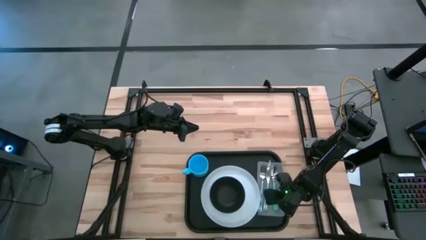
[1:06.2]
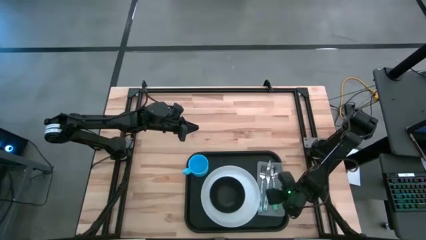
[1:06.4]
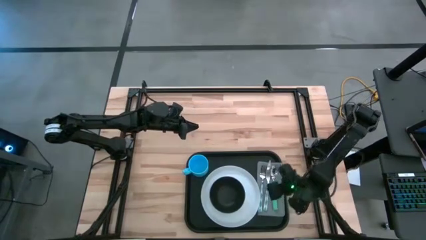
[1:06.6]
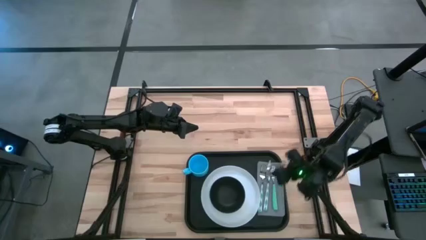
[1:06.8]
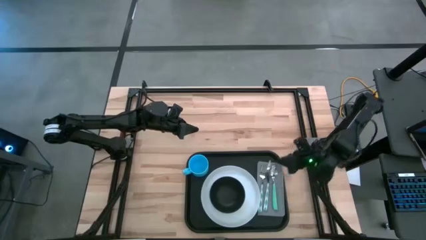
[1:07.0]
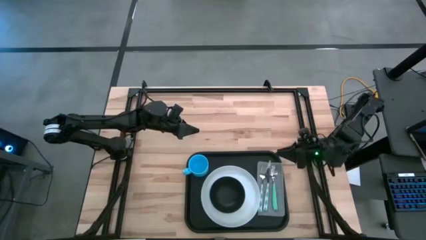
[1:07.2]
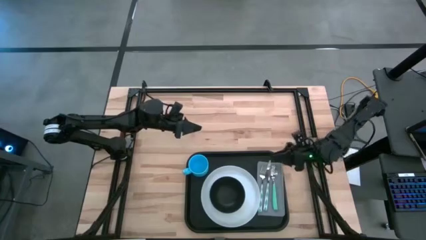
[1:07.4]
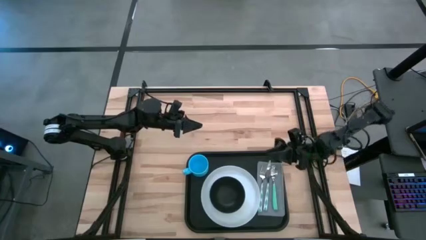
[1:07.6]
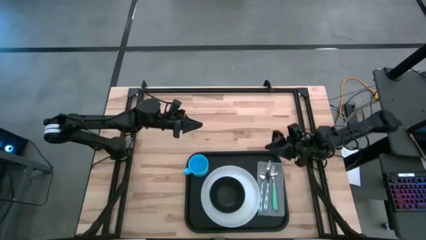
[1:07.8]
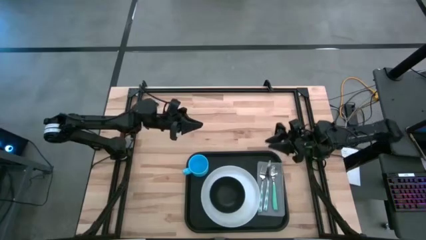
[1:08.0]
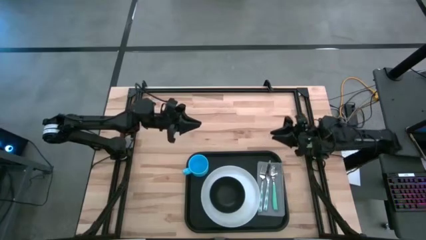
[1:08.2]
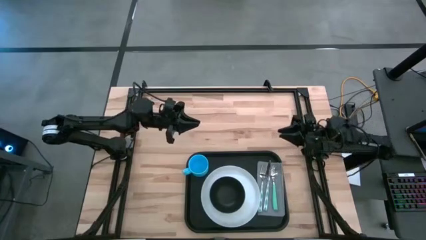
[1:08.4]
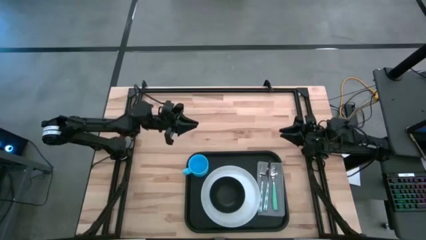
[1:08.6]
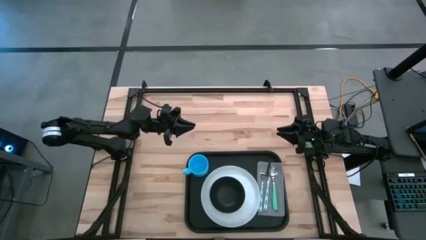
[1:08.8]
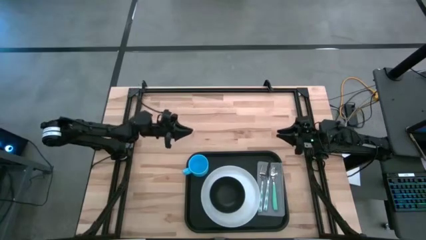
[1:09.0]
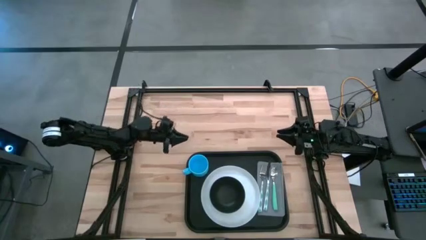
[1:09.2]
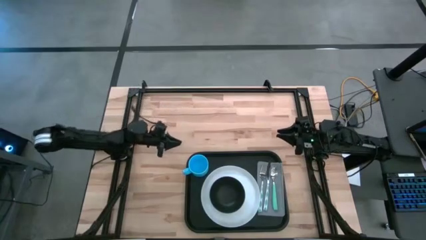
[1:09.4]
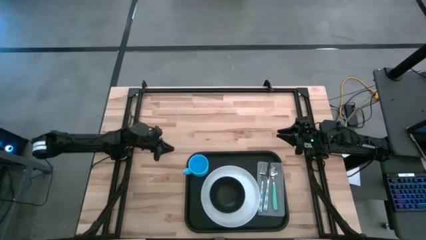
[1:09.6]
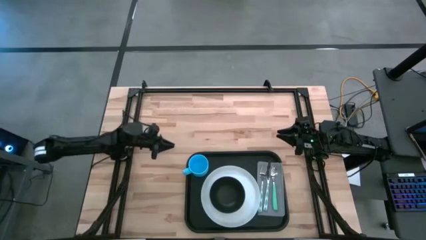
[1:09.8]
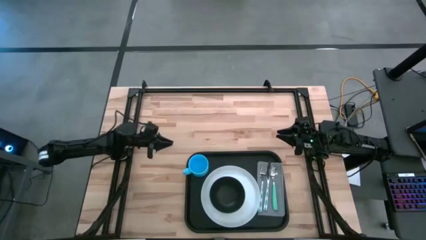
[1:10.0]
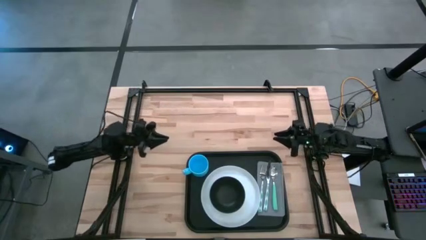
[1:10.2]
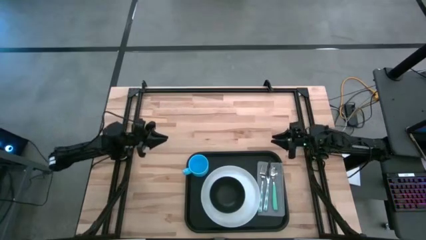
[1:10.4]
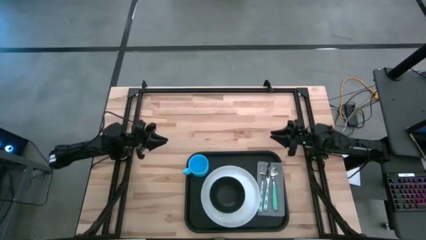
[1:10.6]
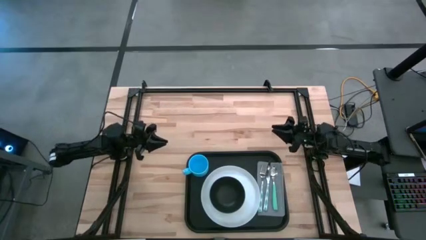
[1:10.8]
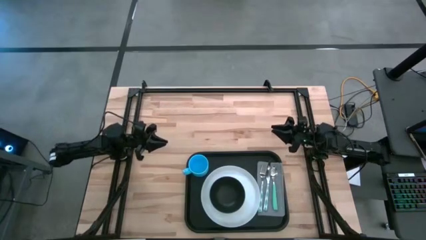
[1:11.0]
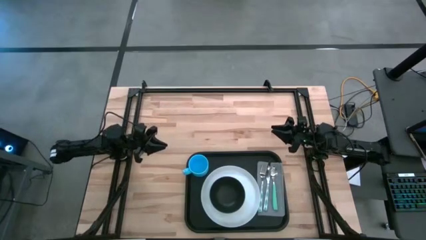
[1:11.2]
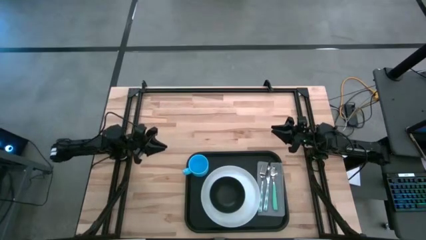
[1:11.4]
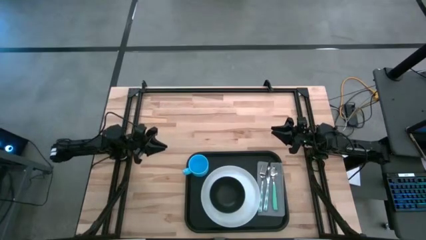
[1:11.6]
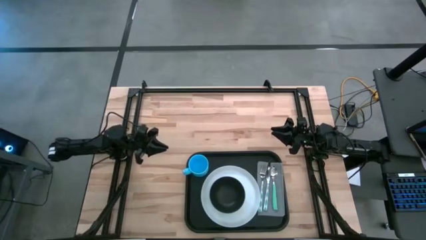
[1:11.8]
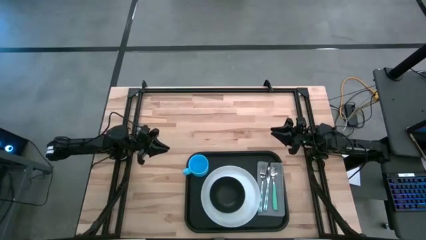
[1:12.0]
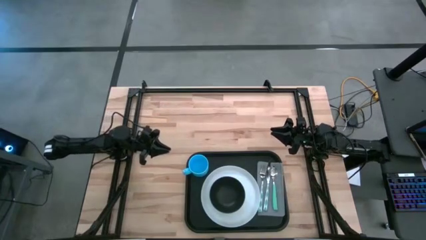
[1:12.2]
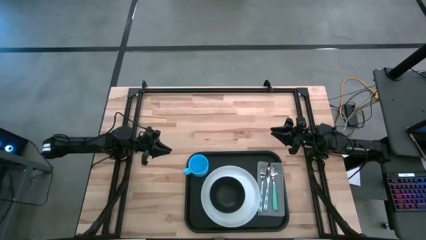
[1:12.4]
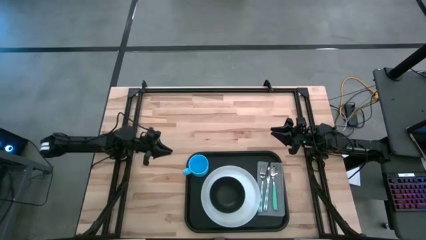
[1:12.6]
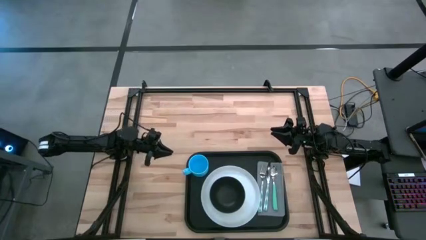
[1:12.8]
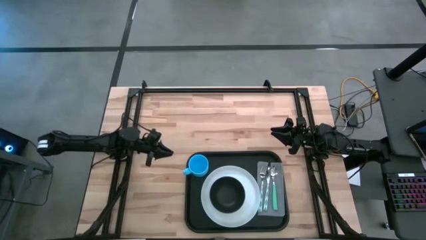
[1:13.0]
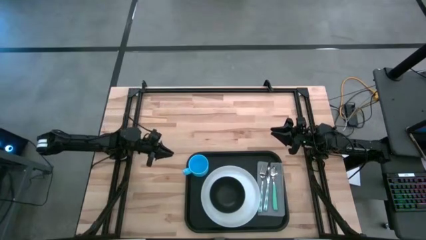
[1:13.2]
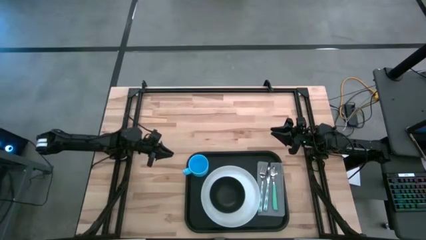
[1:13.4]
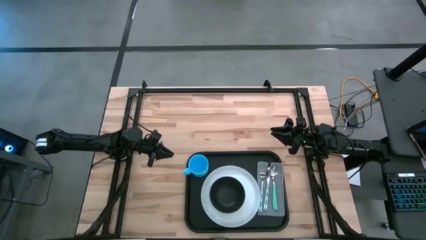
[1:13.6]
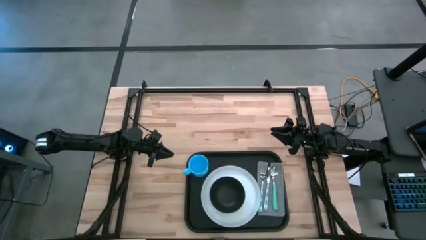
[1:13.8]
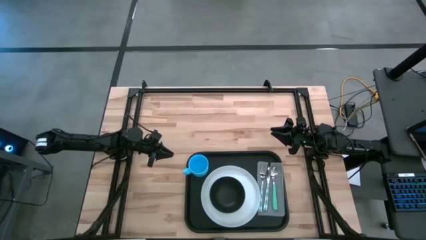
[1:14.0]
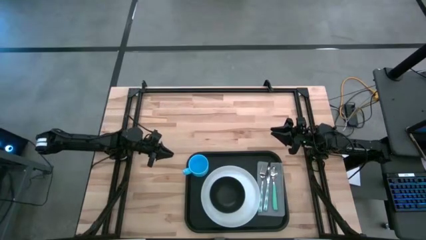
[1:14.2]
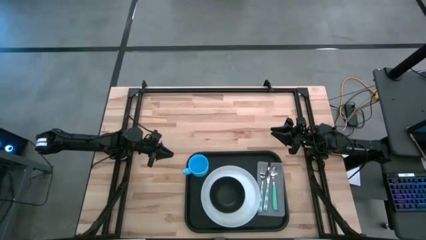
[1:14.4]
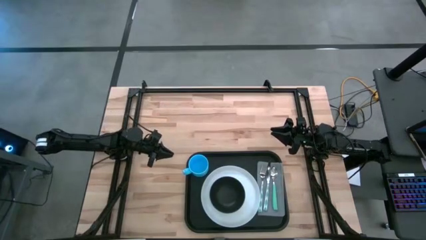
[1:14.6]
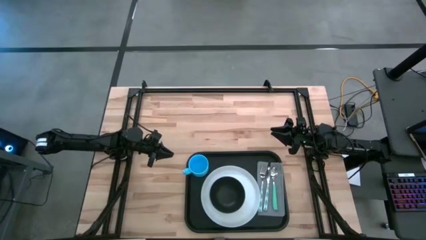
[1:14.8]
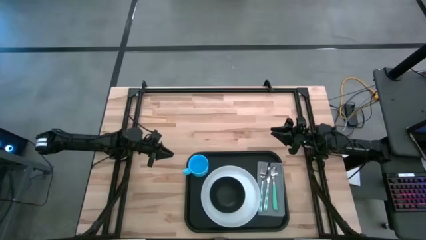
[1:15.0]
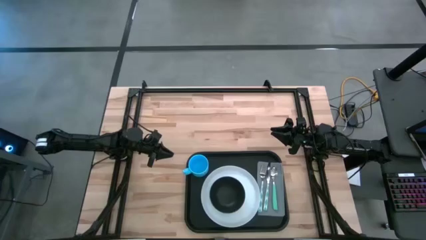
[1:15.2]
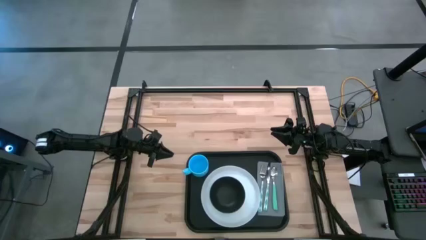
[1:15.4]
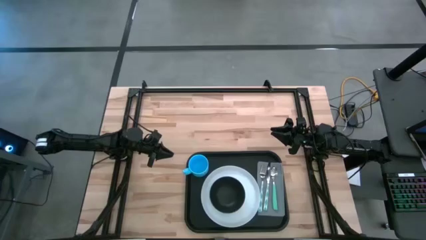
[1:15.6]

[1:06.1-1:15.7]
Task: Set up tray
Return to Home Position

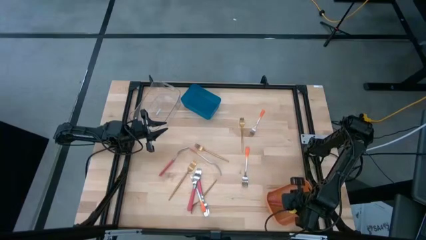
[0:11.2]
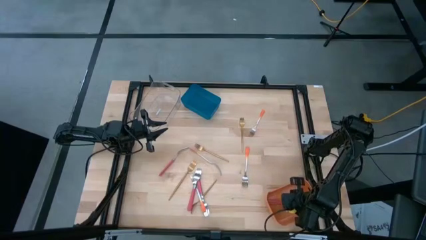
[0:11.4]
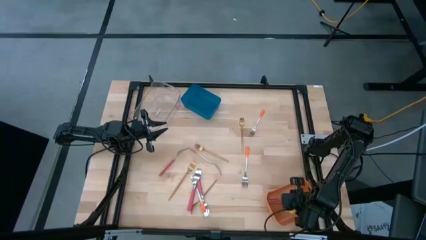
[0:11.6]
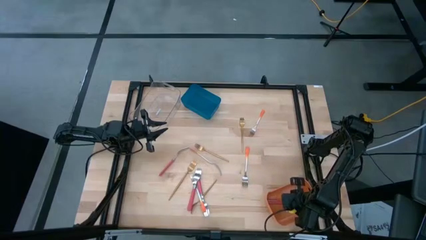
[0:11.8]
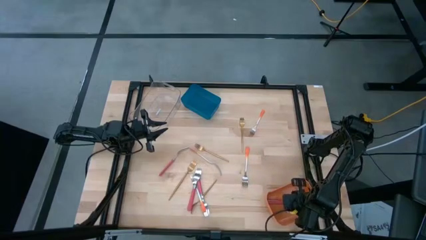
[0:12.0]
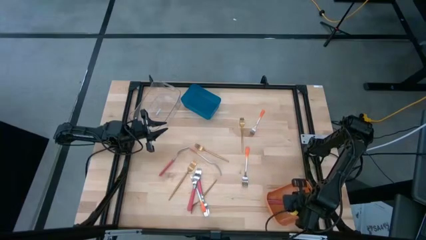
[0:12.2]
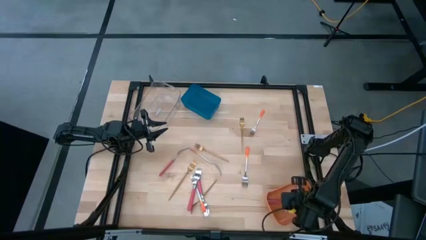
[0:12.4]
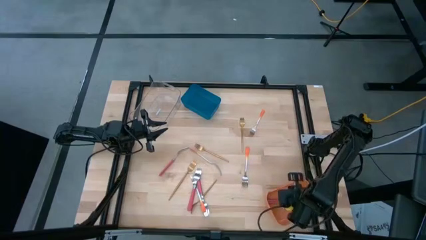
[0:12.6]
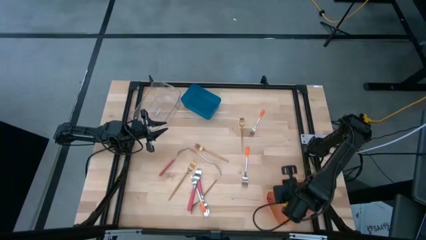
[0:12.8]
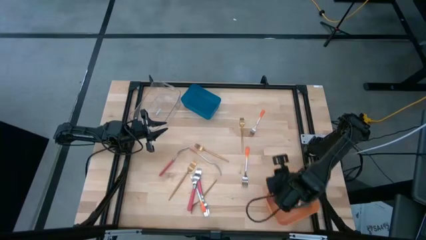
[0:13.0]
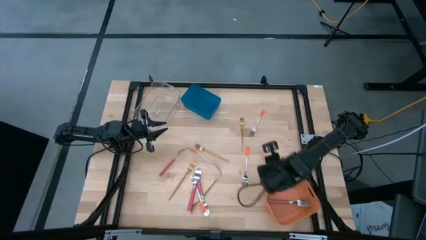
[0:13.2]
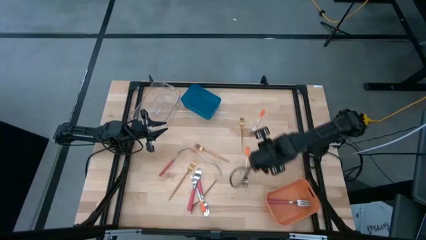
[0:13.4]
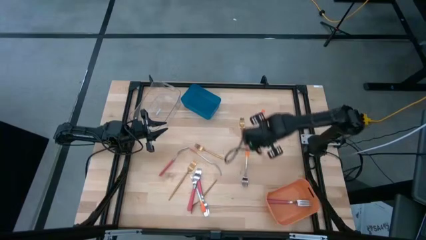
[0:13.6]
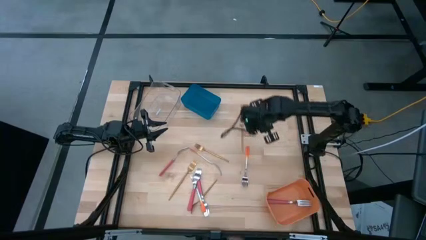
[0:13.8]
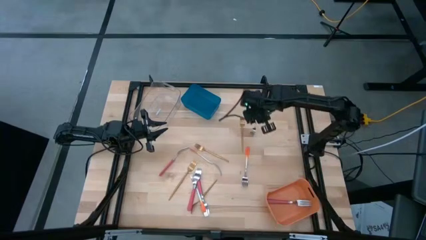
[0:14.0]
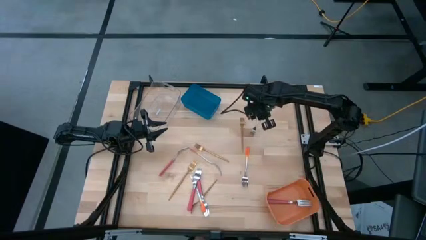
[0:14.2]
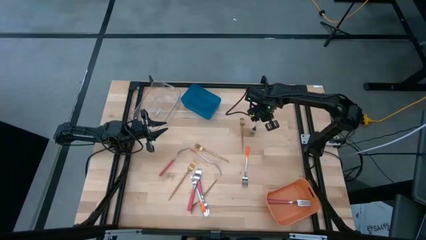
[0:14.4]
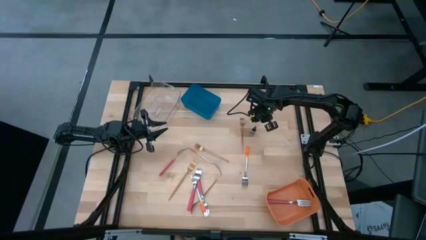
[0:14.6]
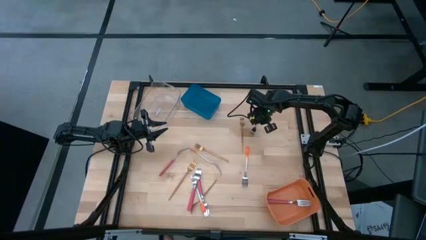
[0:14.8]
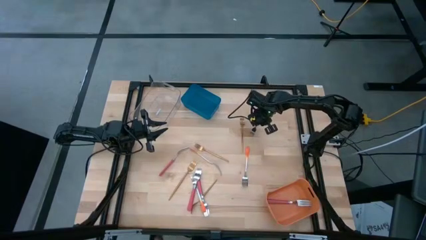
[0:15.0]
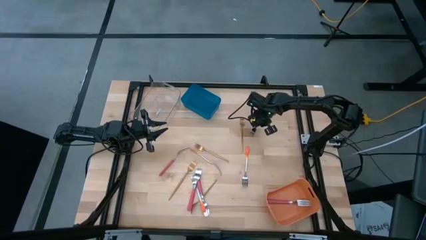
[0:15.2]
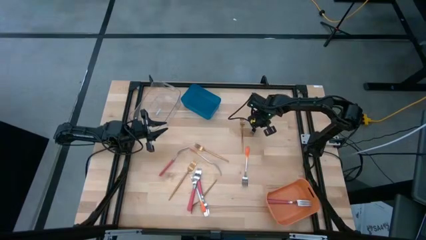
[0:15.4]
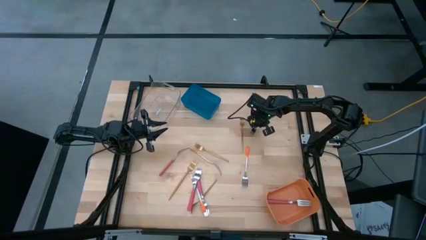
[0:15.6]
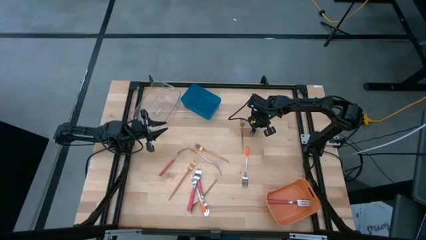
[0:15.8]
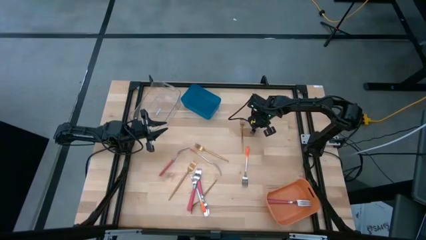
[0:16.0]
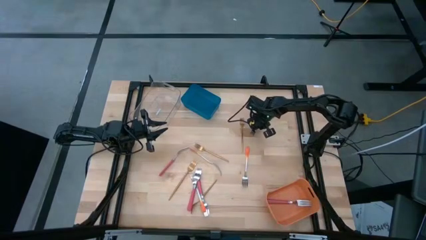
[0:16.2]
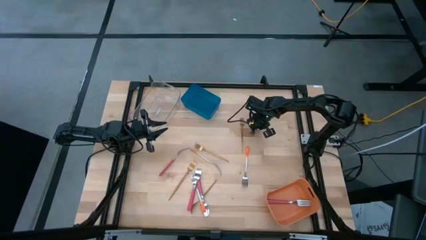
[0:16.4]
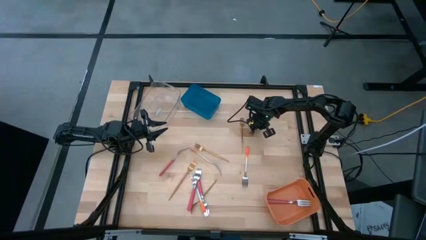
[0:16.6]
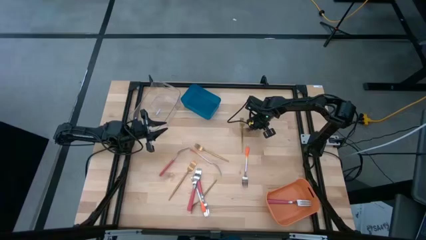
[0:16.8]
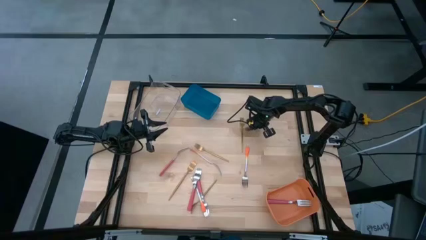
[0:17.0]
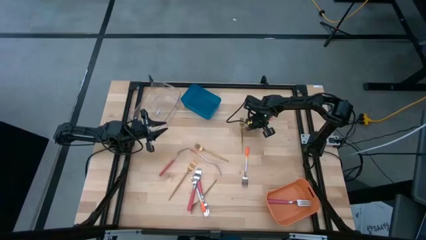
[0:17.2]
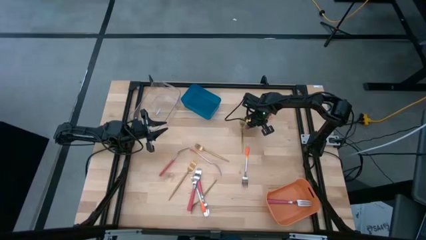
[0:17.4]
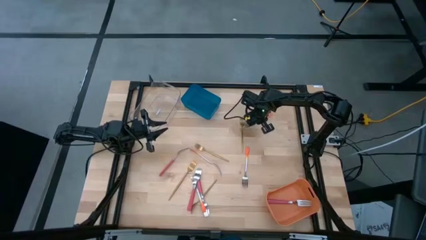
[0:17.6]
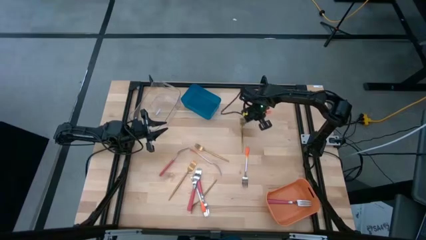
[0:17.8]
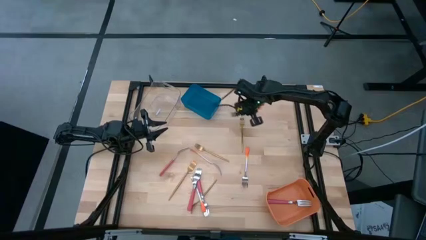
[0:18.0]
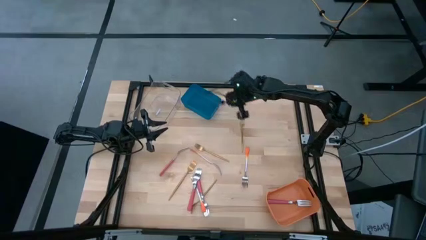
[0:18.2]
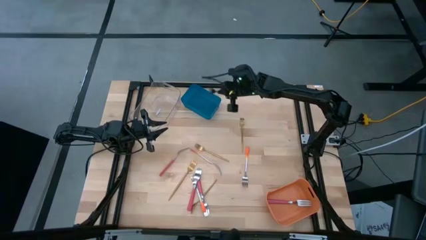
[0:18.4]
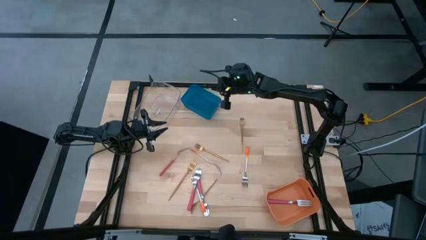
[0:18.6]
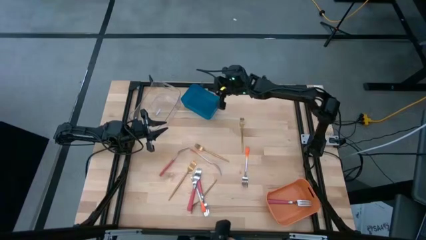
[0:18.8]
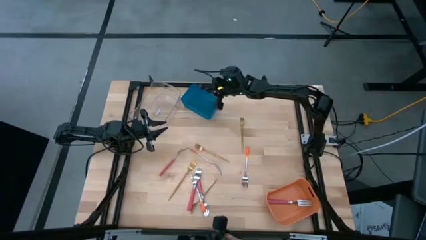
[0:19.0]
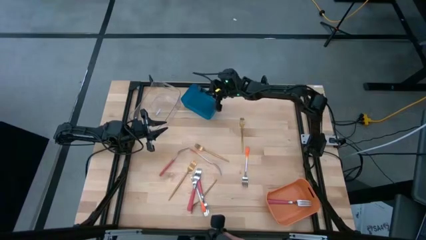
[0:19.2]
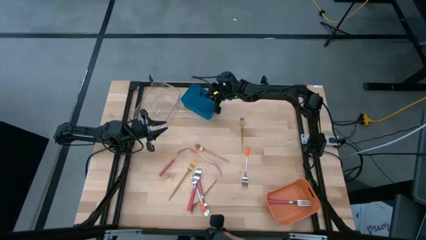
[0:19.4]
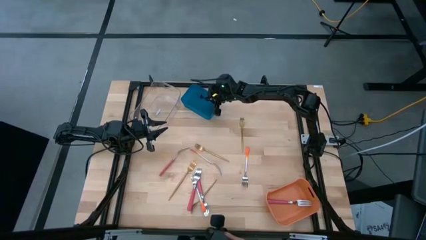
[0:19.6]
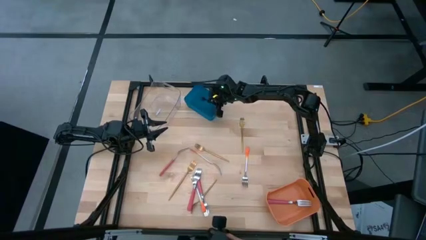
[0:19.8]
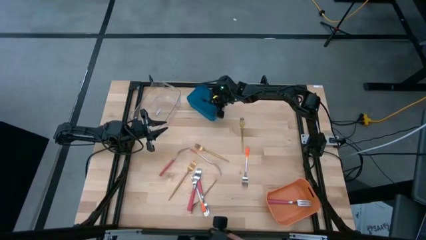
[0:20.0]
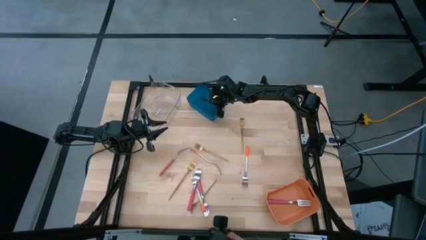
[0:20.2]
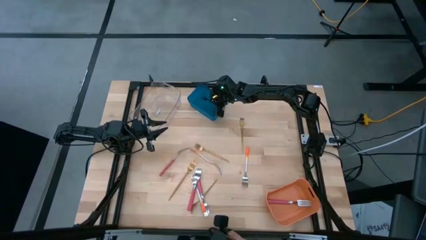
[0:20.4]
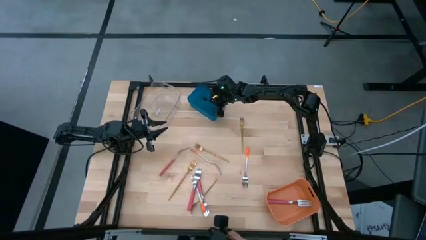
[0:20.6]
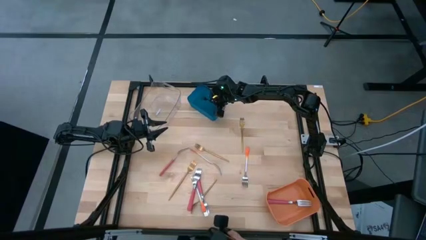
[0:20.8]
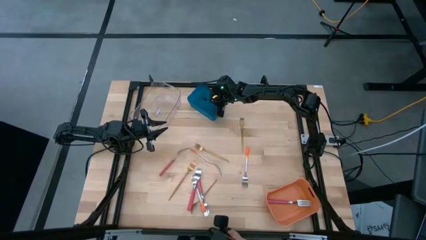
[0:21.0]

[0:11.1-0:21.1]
Task: Sort silverware by color (type)
Put the orange fork into the blue bin
